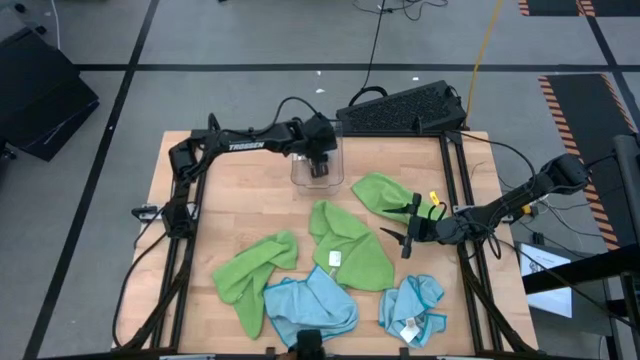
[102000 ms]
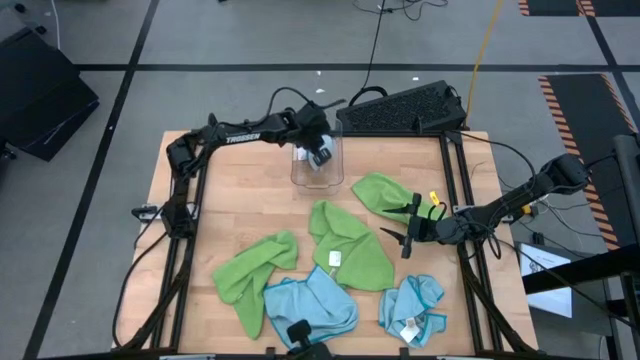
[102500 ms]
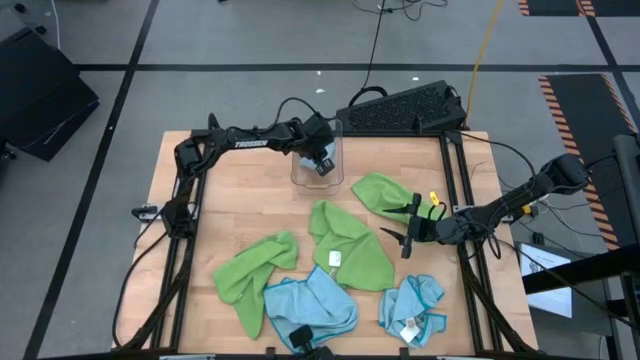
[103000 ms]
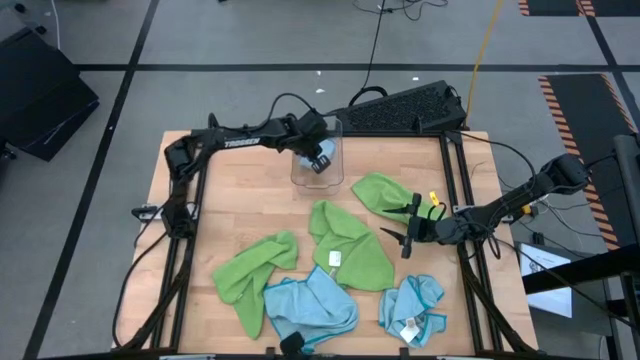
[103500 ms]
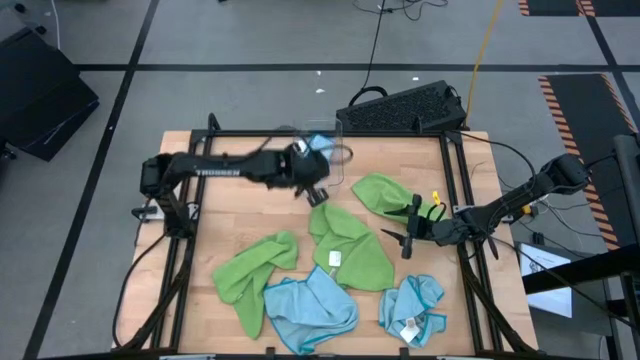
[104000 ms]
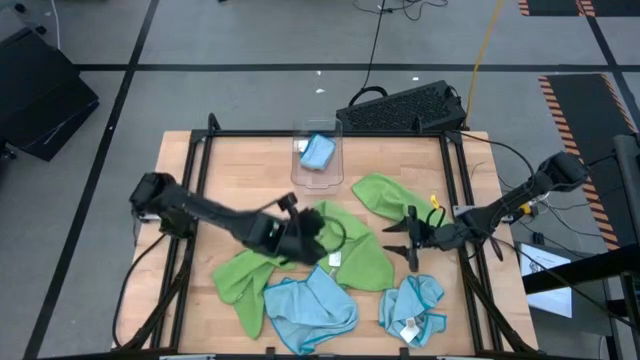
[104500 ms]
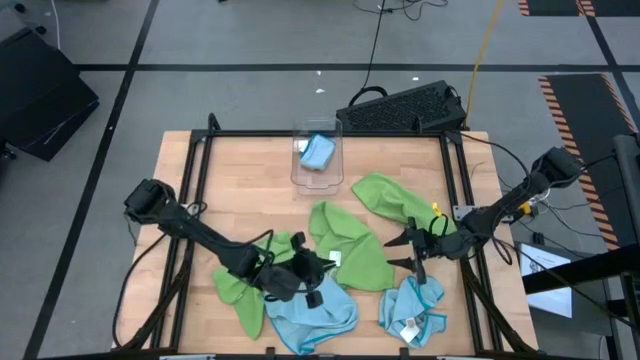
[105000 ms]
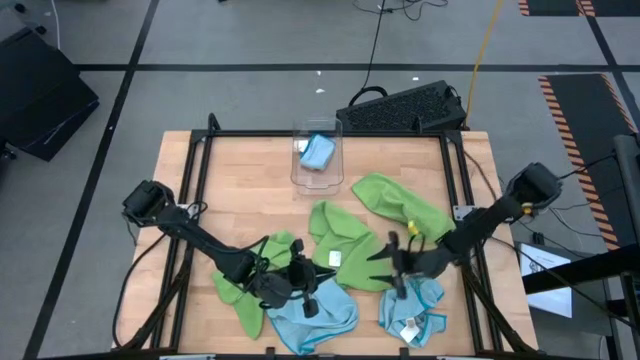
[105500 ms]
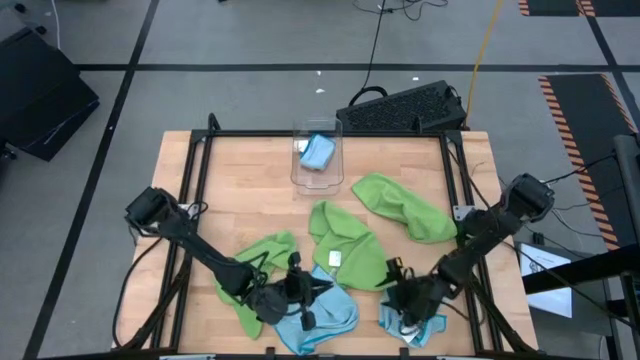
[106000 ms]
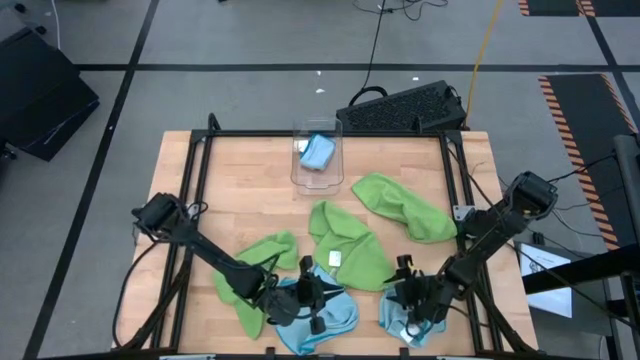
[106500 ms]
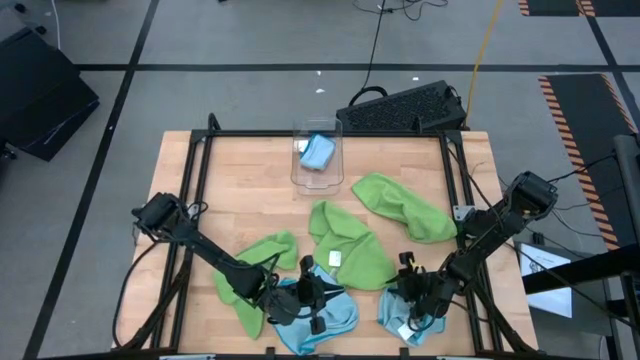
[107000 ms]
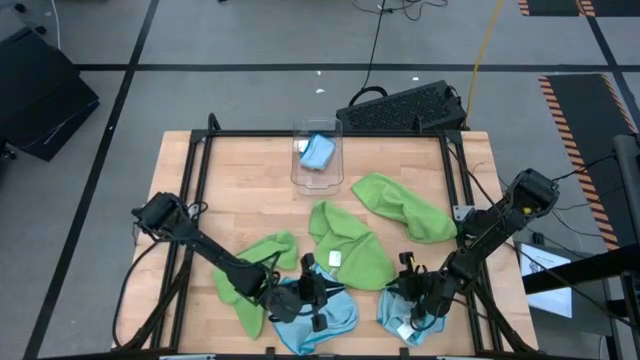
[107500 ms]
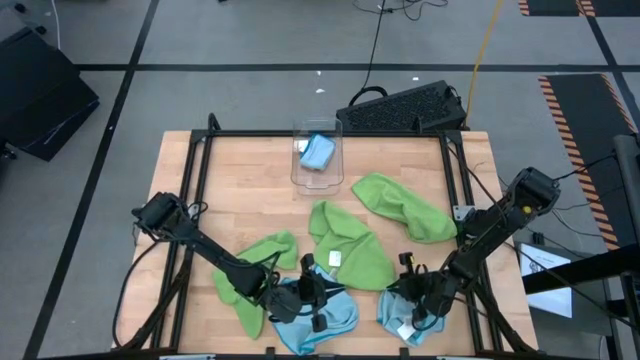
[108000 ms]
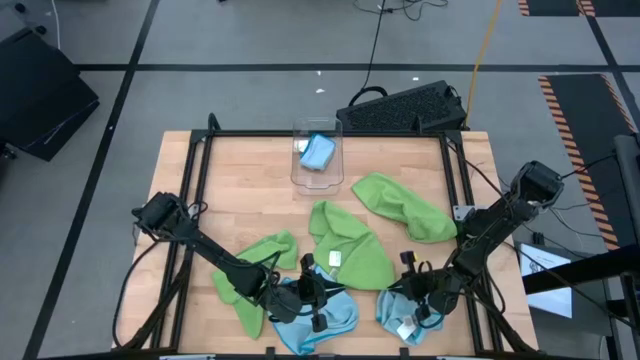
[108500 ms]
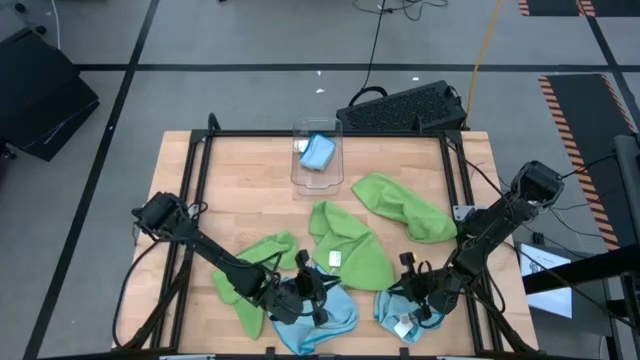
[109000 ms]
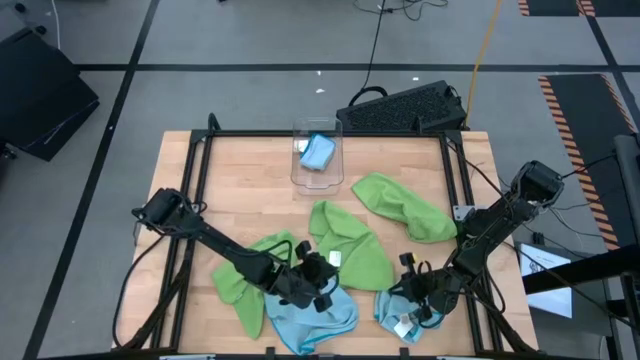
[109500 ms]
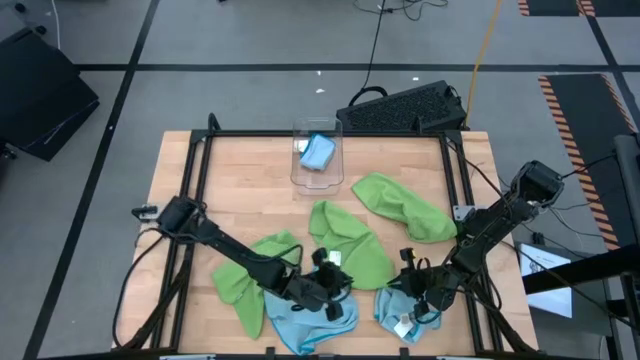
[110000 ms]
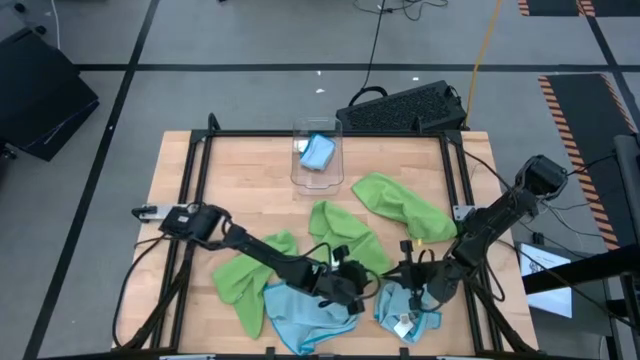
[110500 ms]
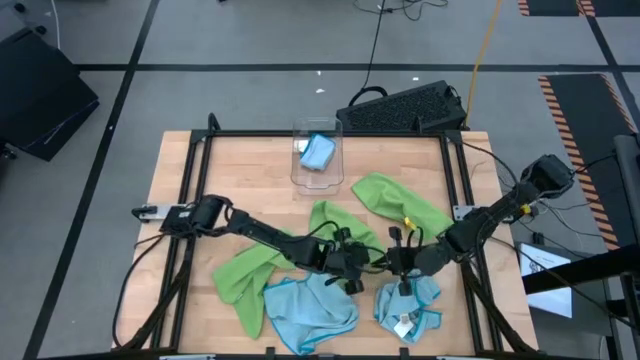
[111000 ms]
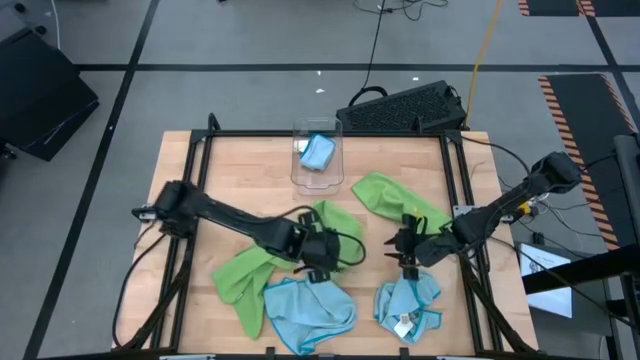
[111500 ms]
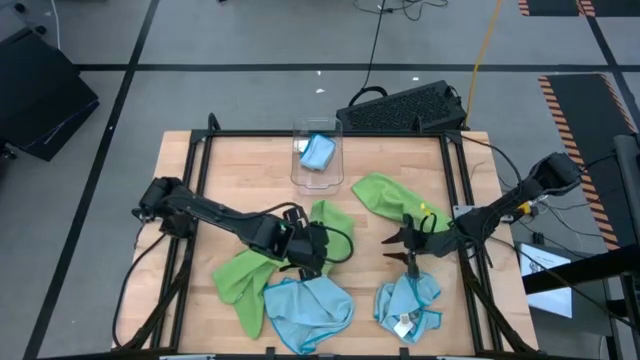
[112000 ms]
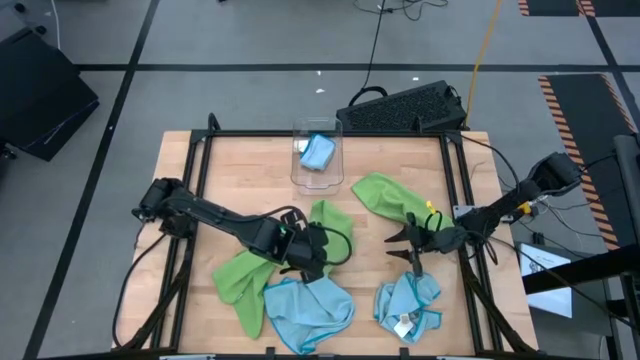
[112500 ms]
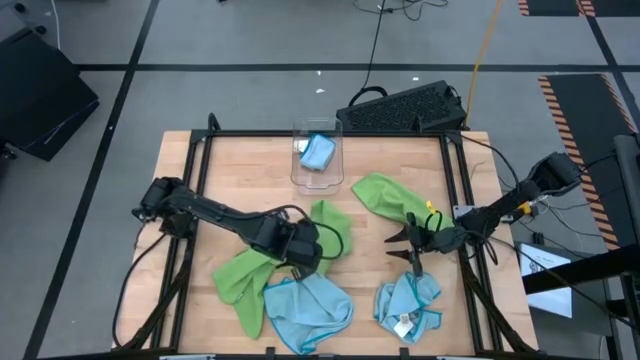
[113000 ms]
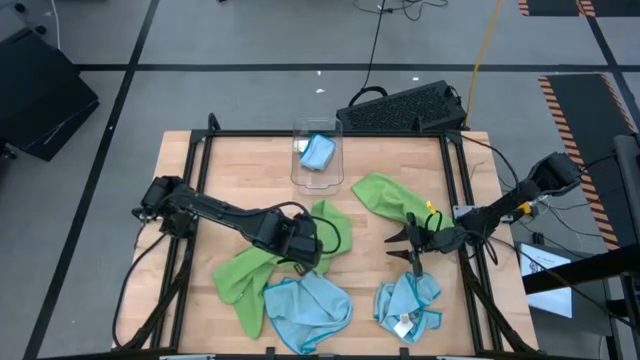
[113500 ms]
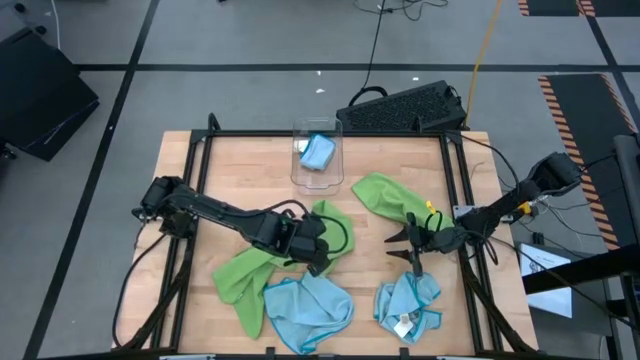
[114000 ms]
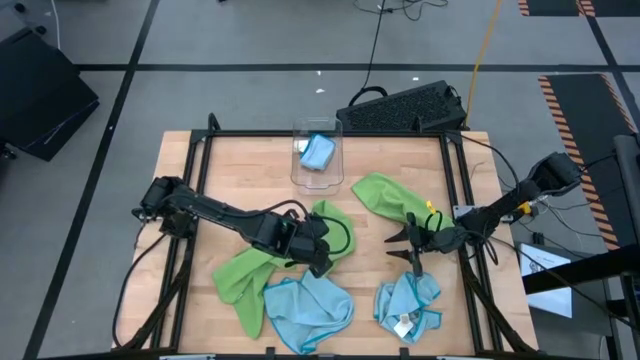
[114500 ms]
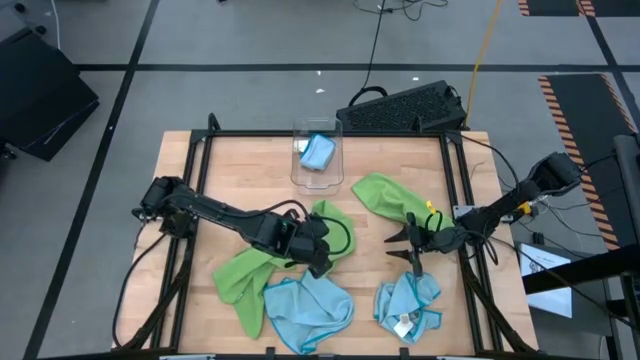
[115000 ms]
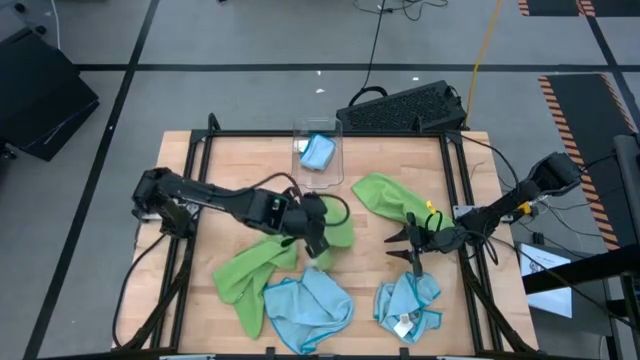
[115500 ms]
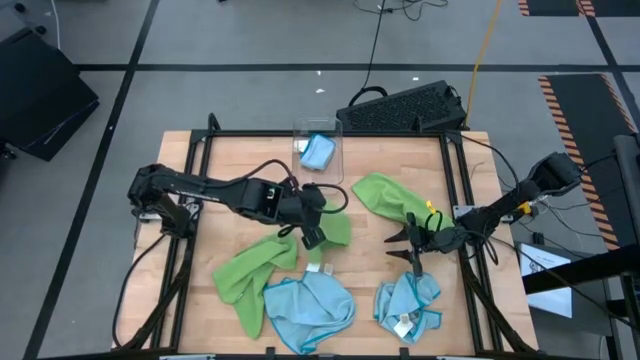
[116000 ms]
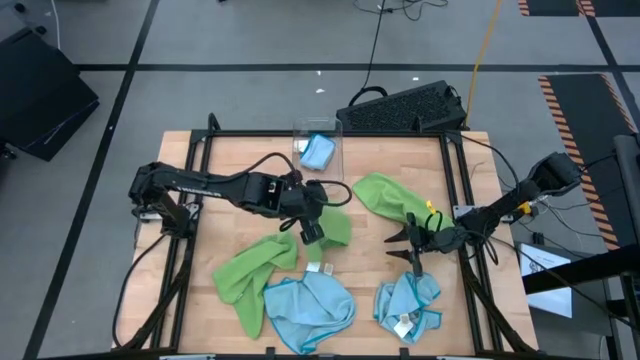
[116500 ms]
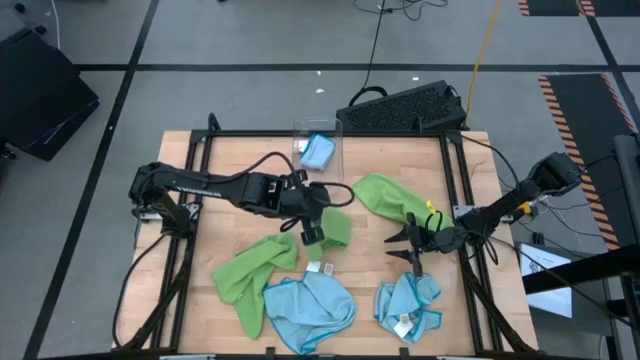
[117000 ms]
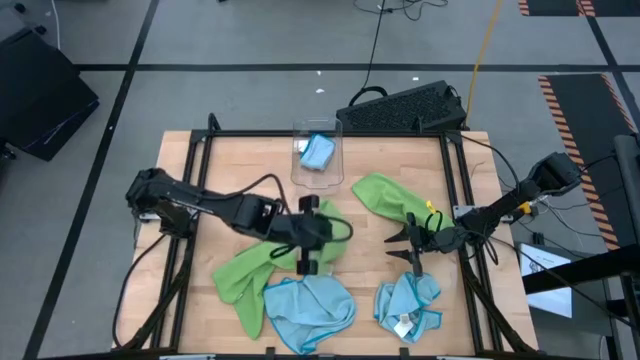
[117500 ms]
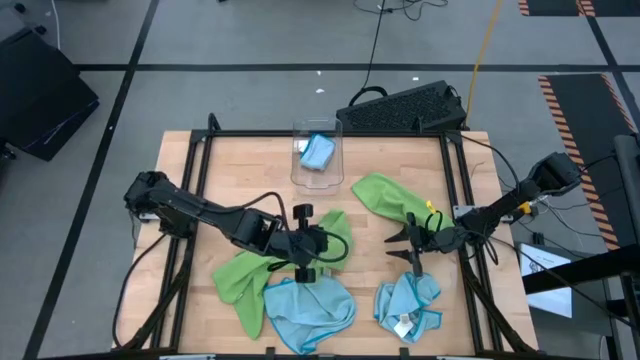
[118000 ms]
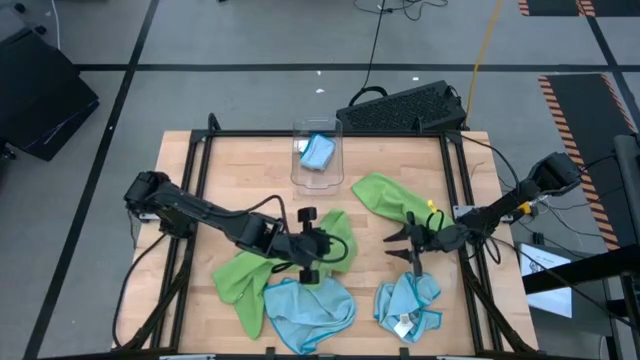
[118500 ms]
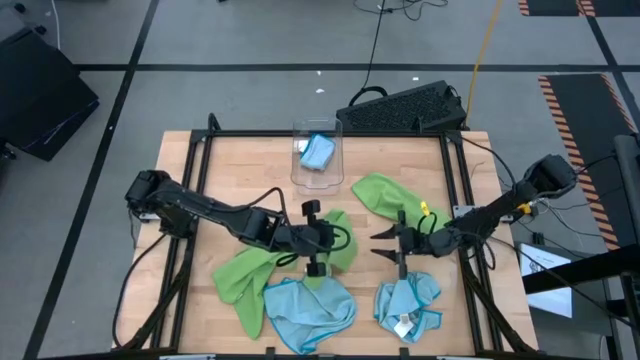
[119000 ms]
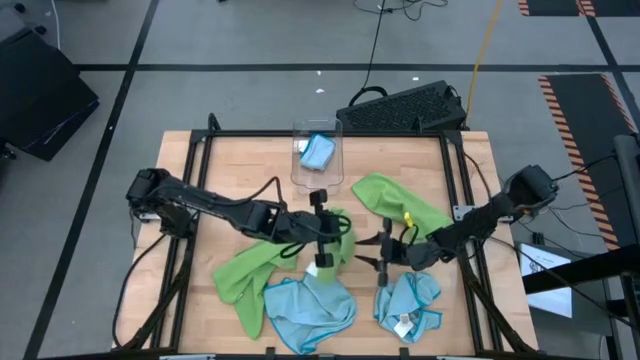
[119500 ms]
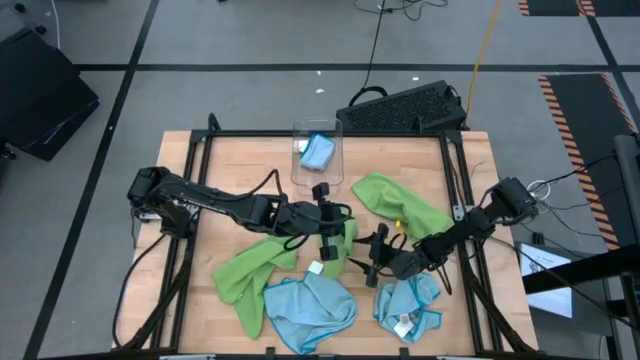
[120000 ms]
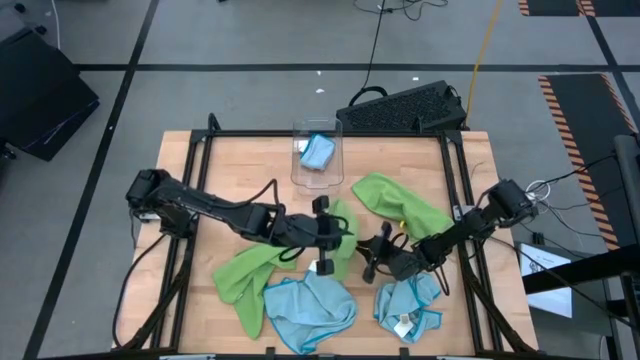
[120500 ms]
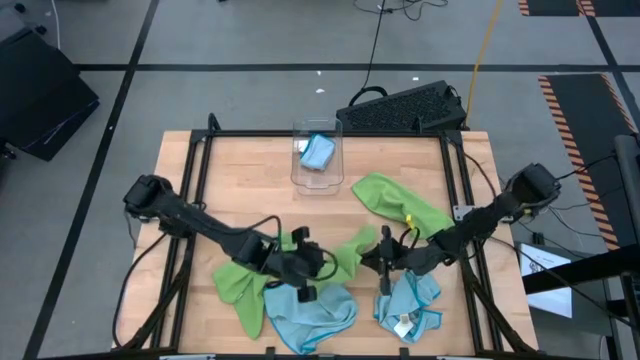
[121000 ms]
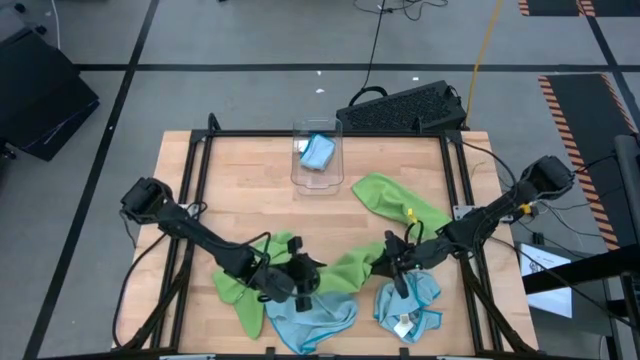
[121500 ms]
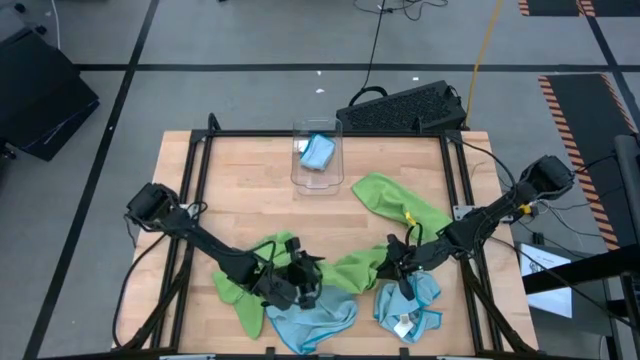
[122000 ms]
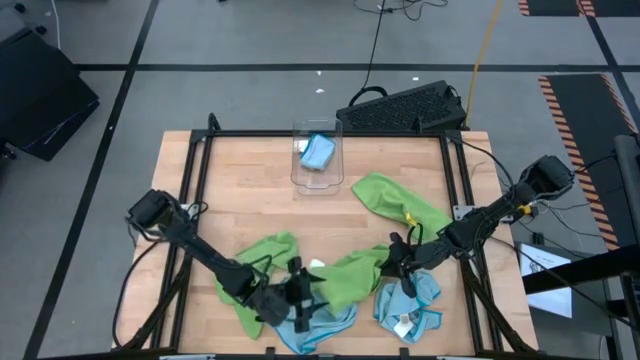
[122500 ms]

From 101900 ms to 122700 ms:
Task: Fold microfiber towels
Fold the center green towel
